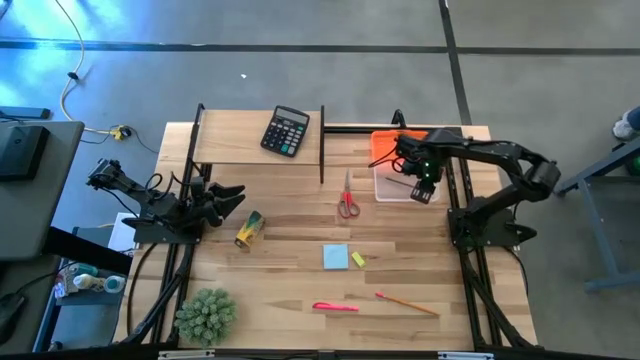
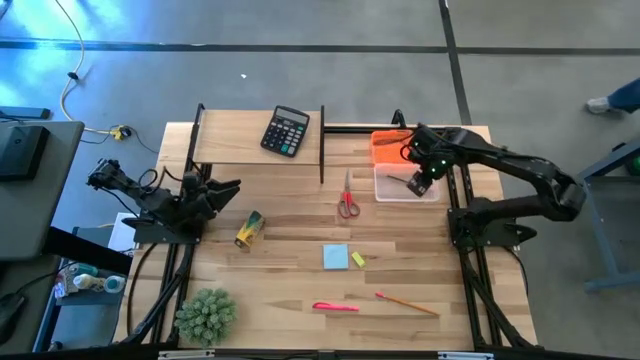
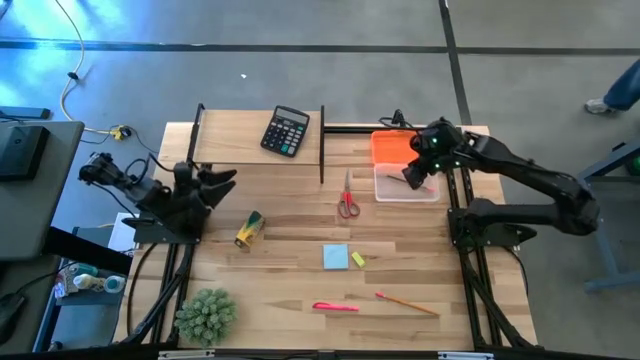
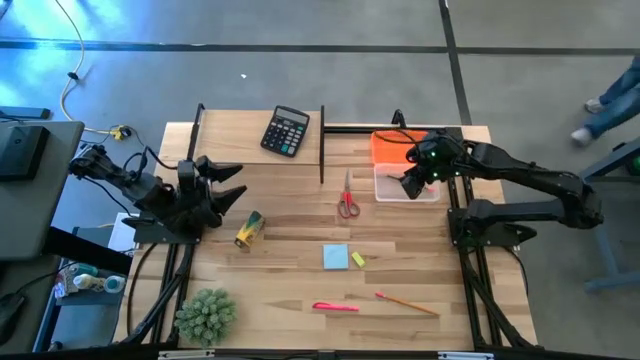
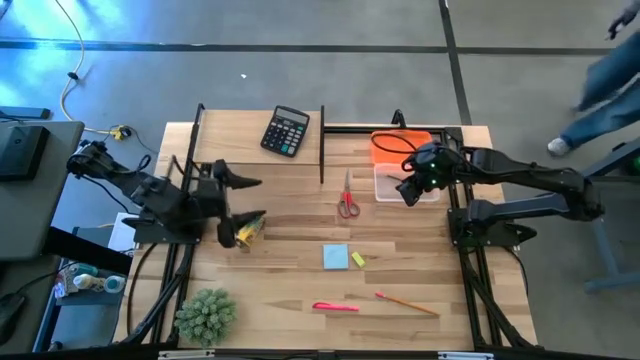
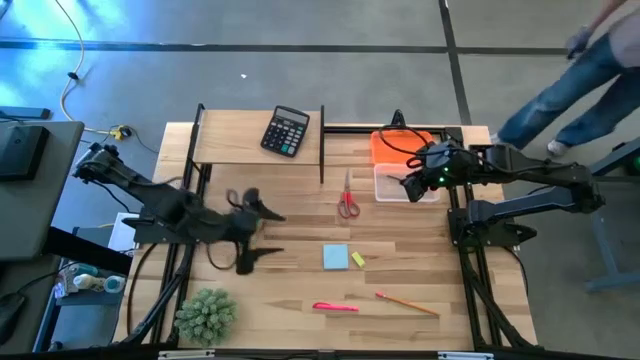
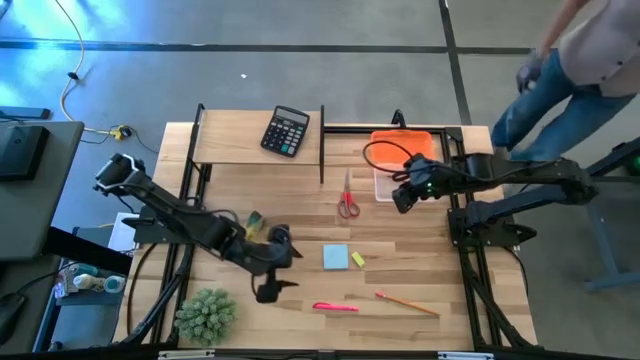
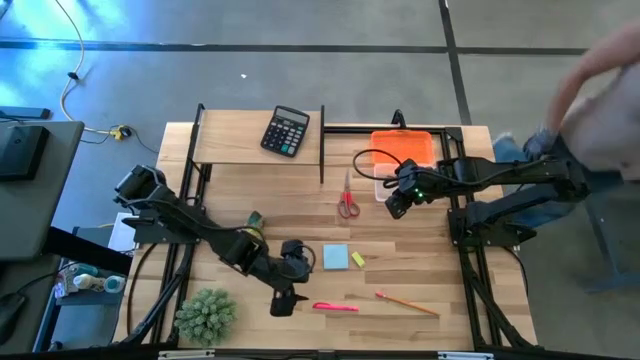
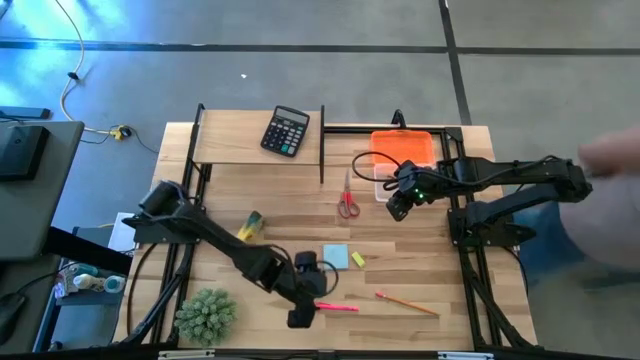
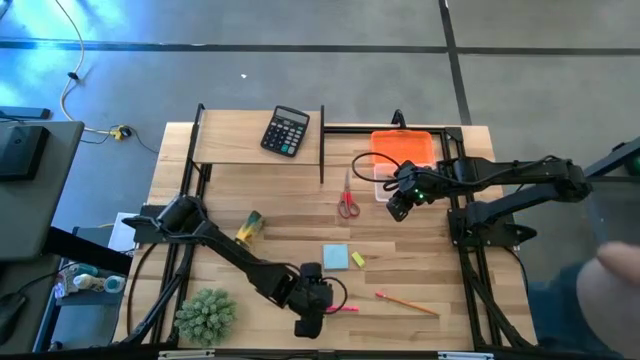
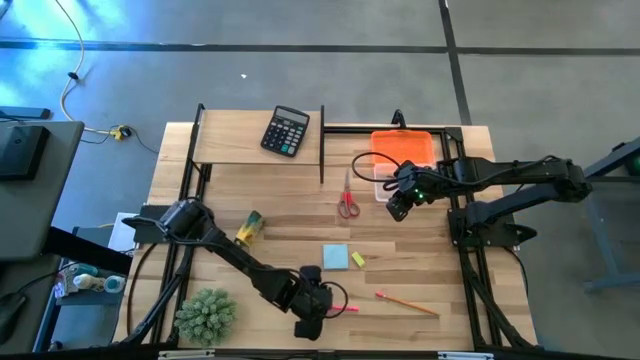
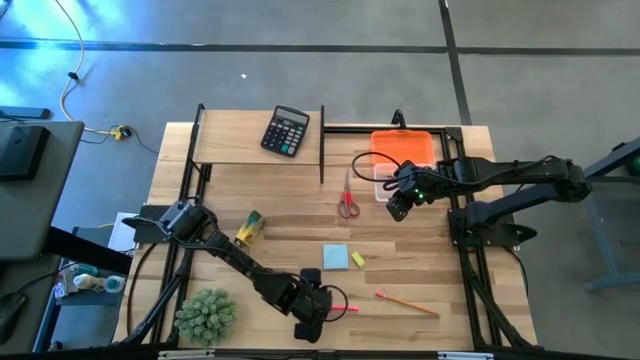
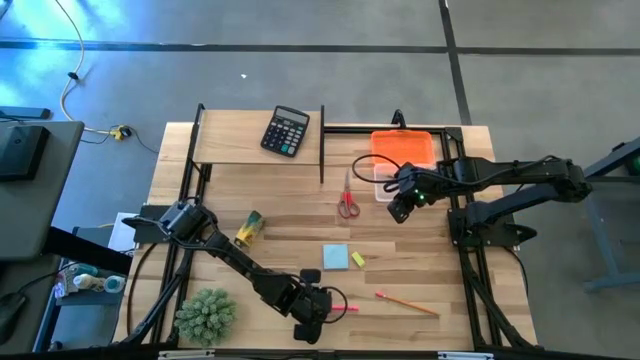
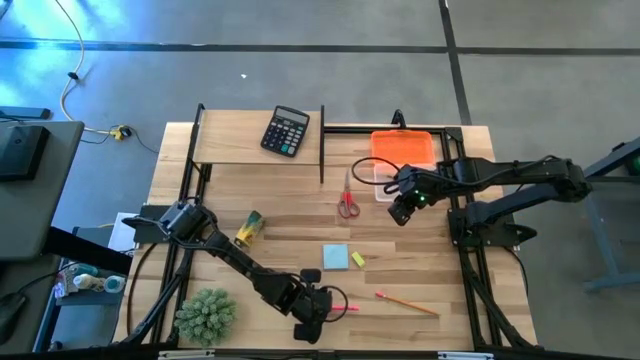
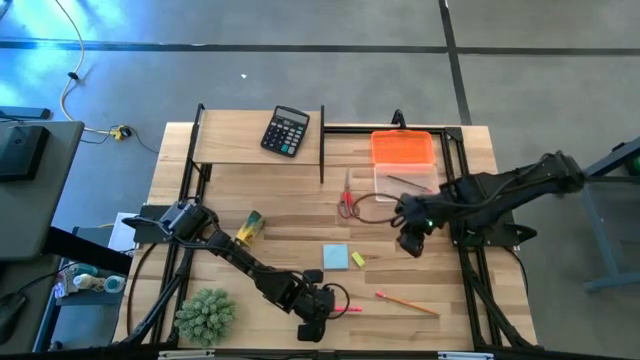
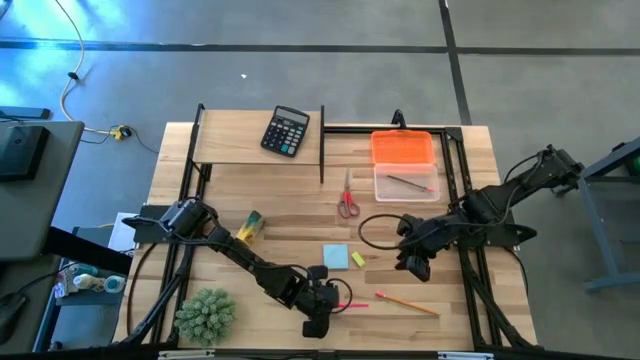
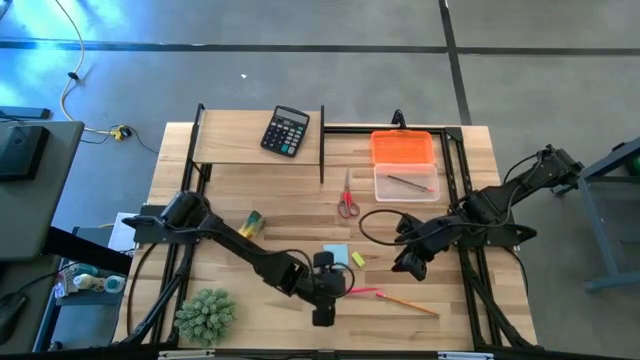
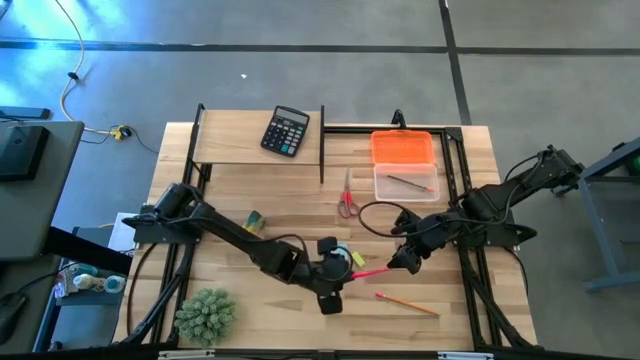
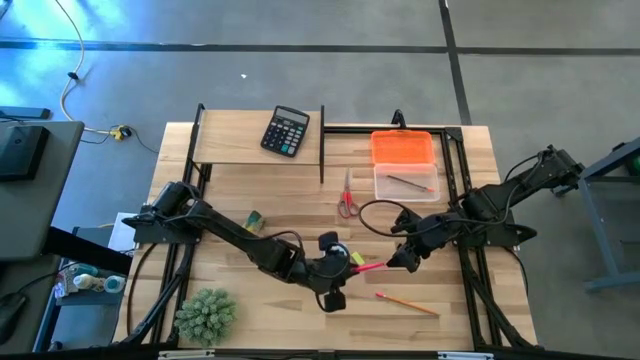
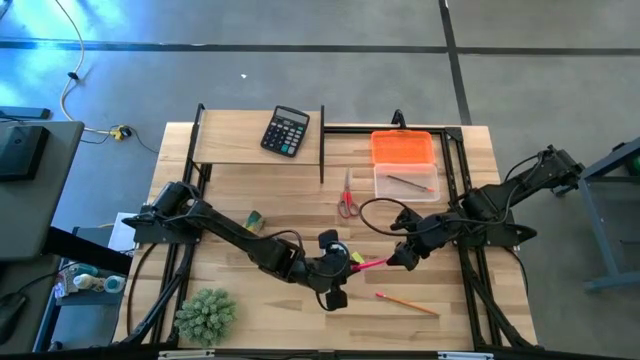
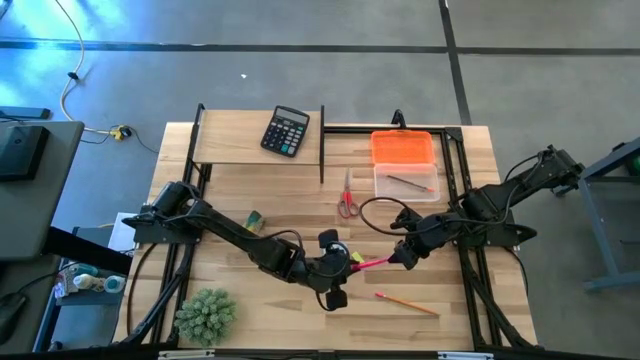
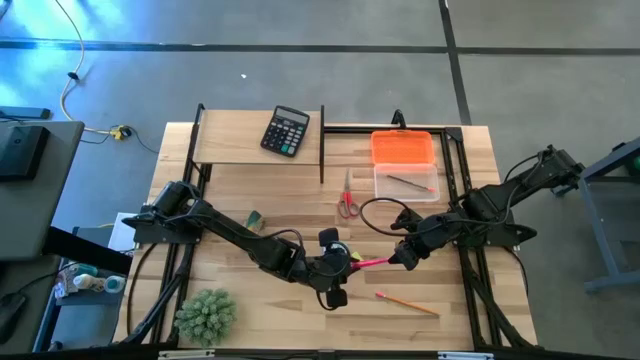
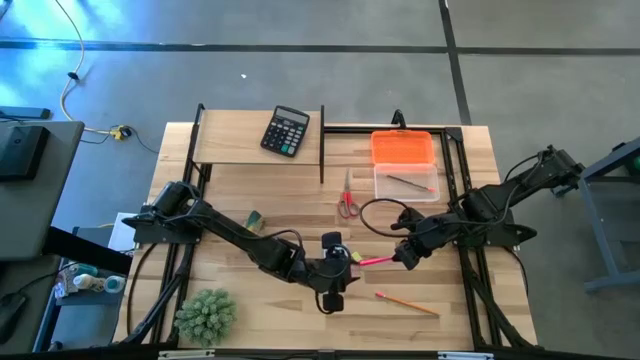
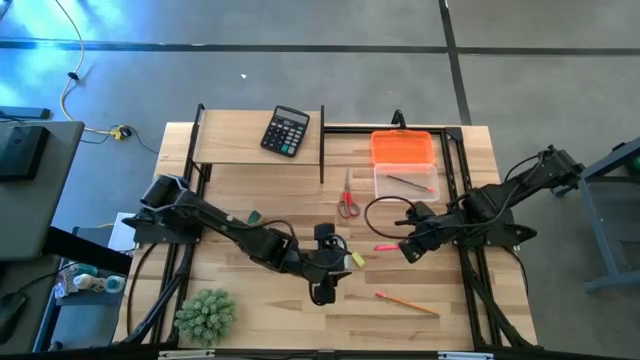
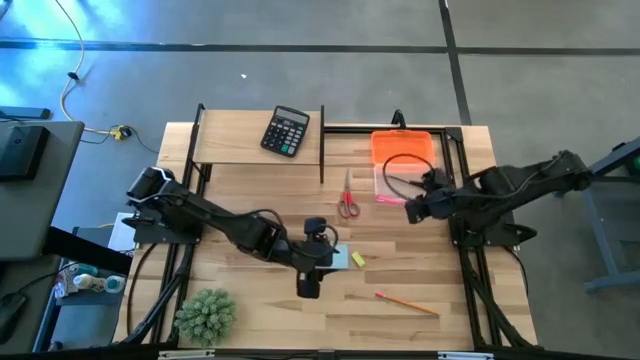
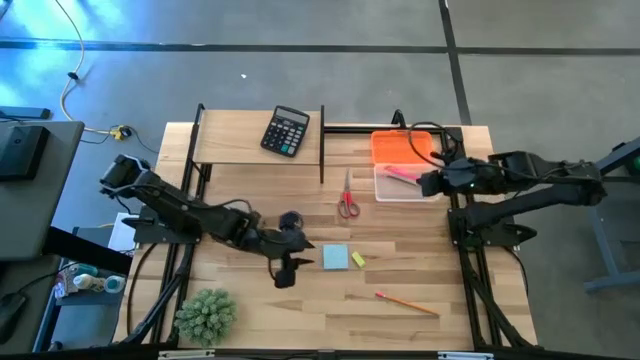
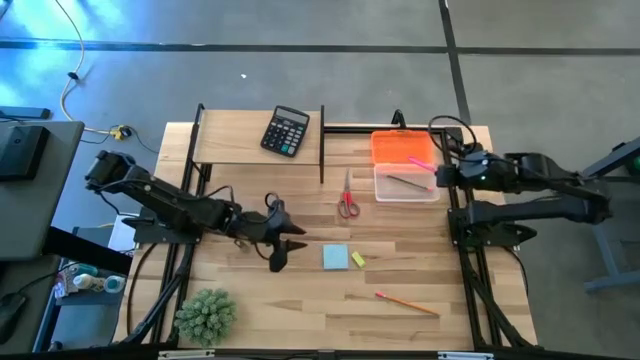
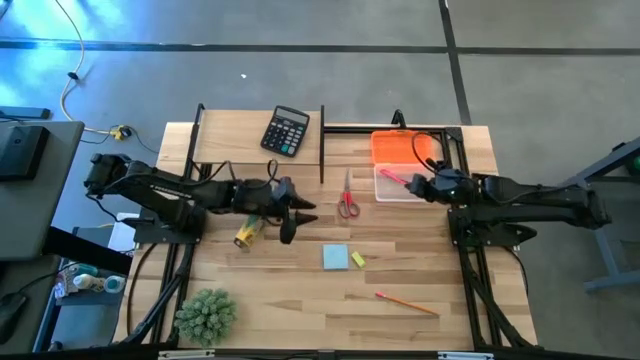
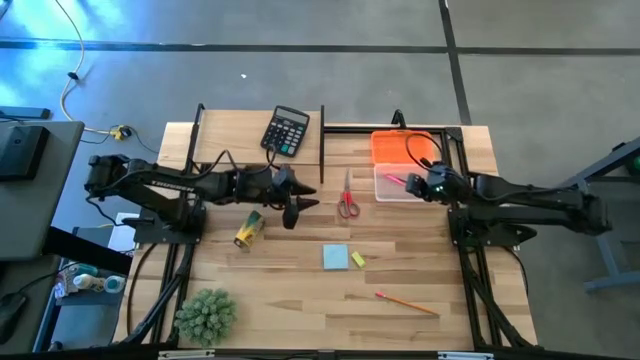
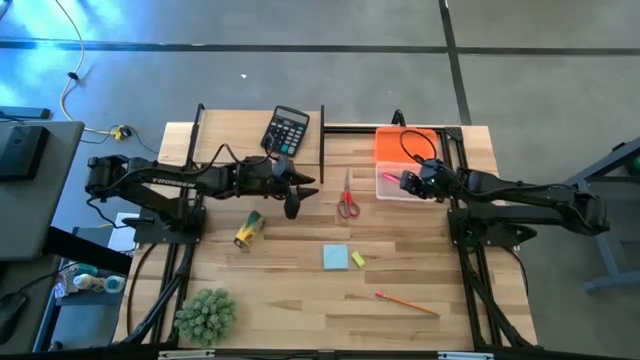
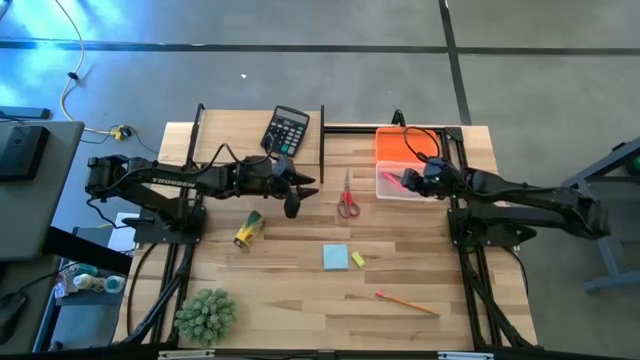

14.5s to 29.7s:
Task: Pack school essentials
Put the pink pen into the orange supply box

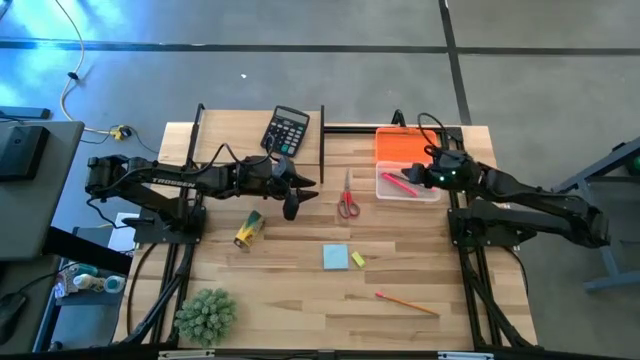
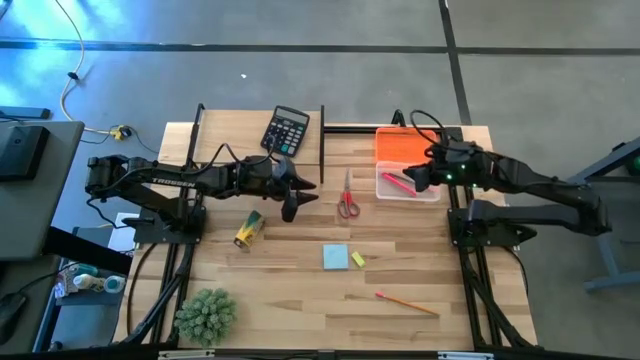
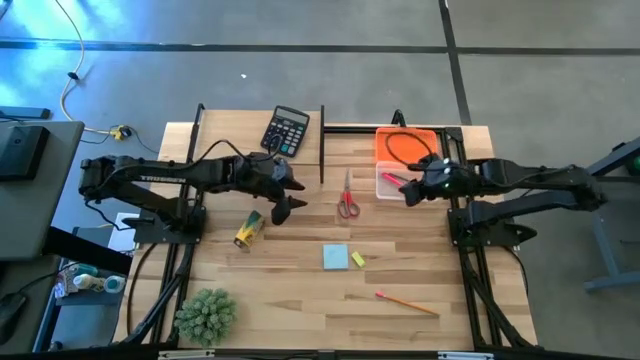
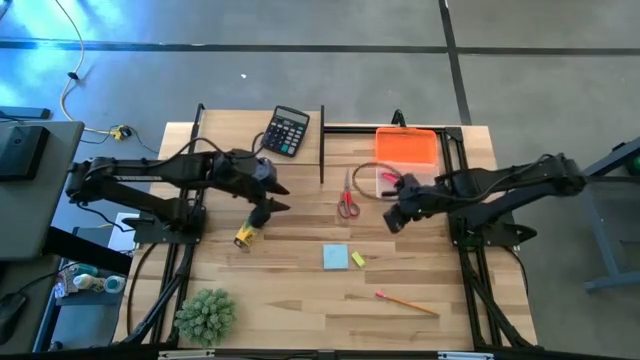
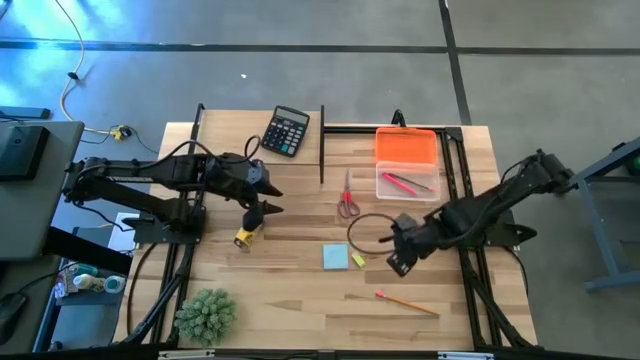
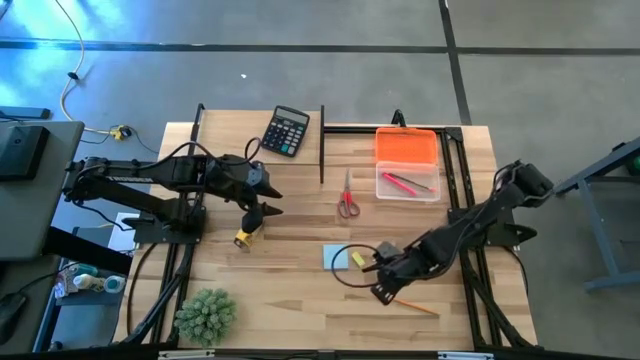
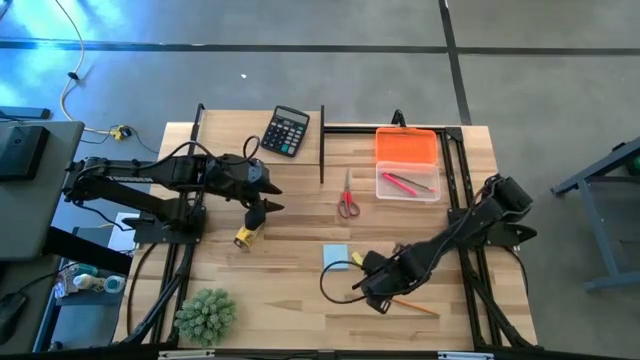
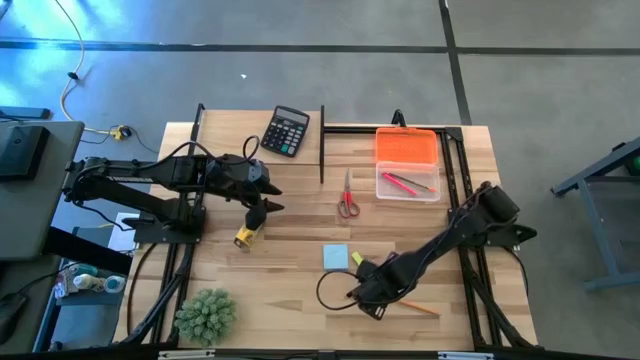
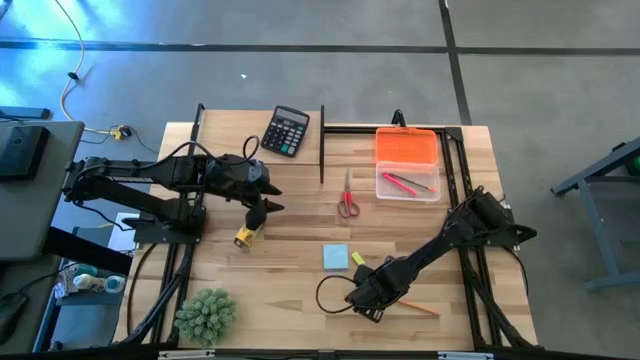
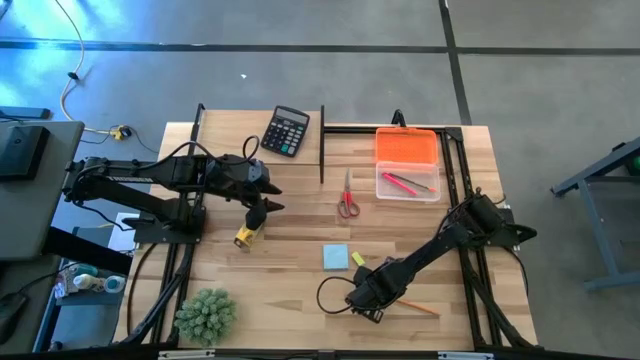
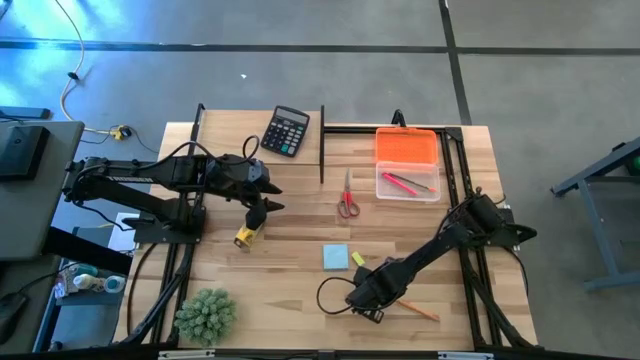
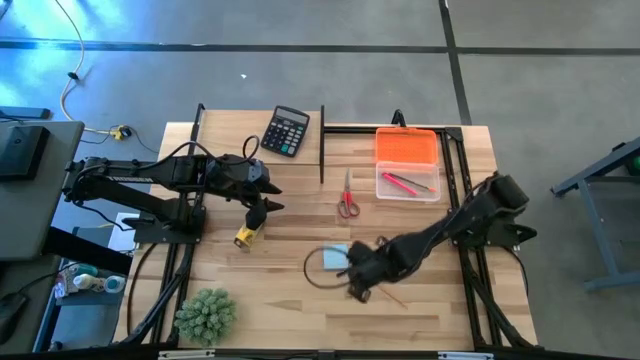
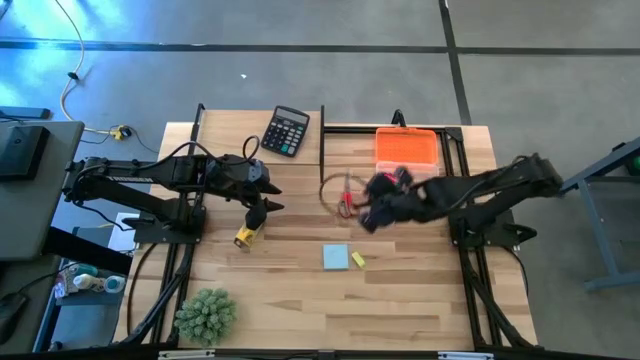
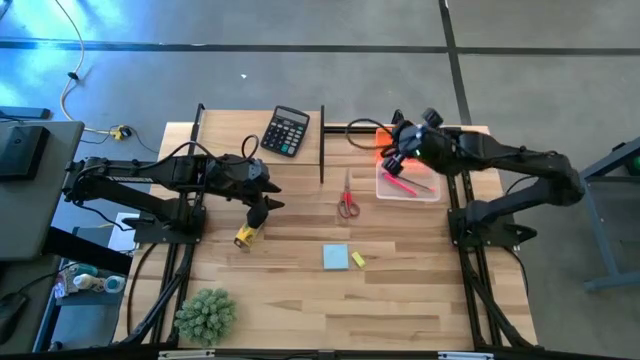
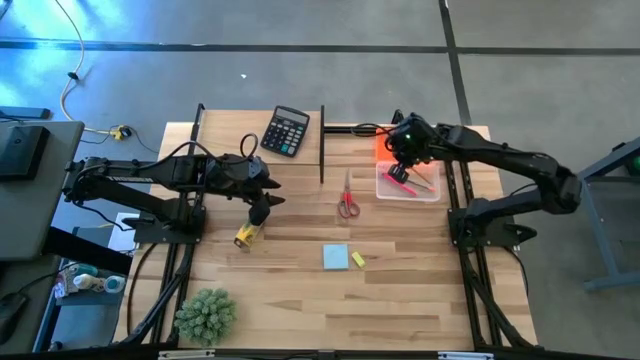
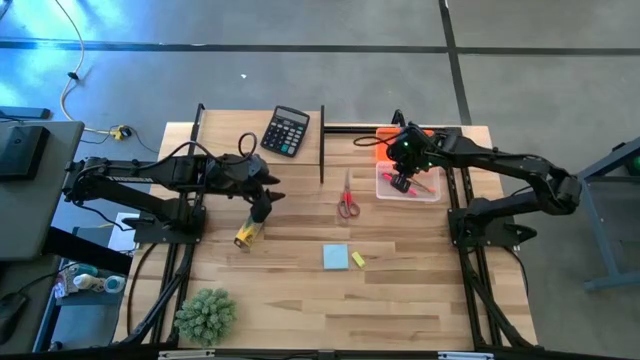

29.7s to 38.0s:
Put the yellow pencil into the orange supply box
